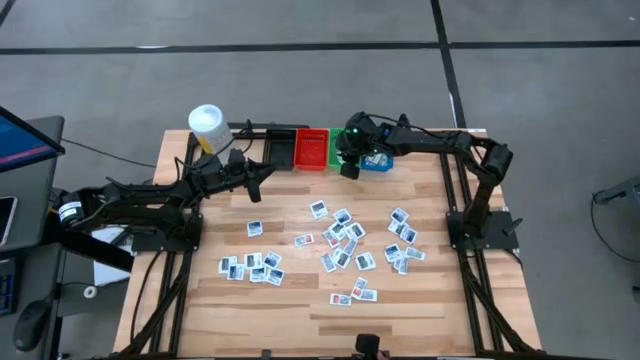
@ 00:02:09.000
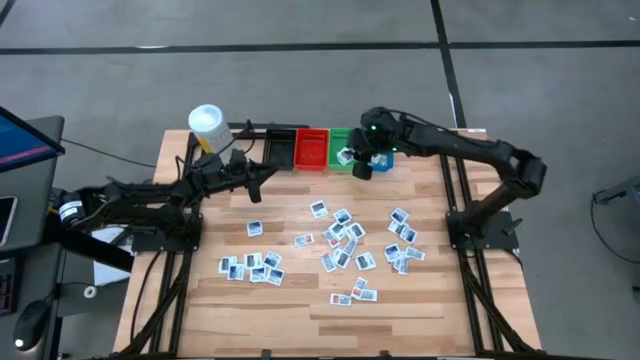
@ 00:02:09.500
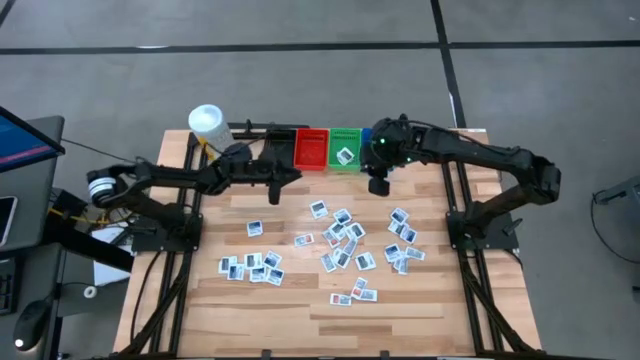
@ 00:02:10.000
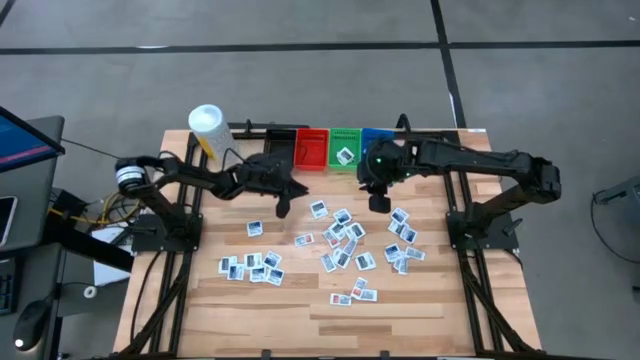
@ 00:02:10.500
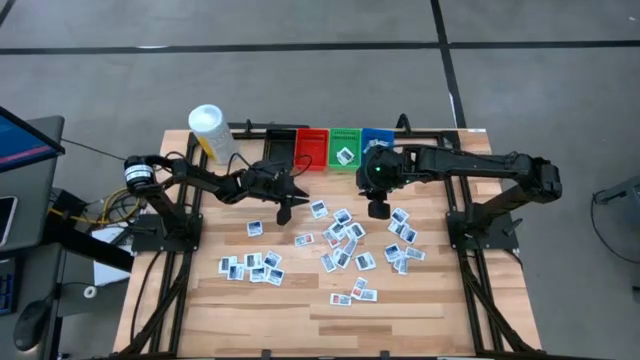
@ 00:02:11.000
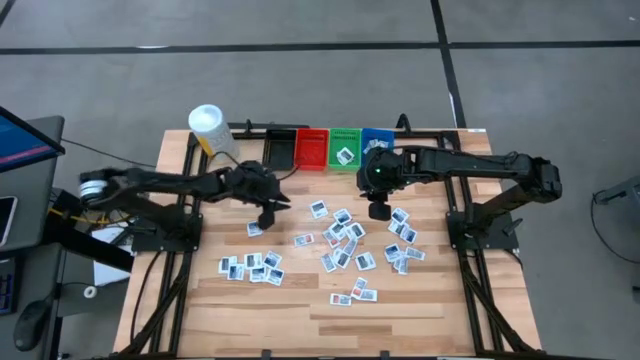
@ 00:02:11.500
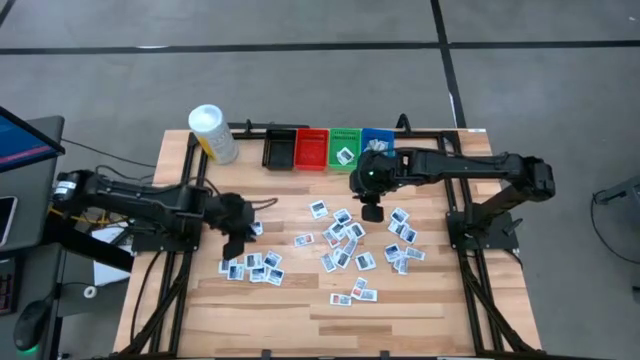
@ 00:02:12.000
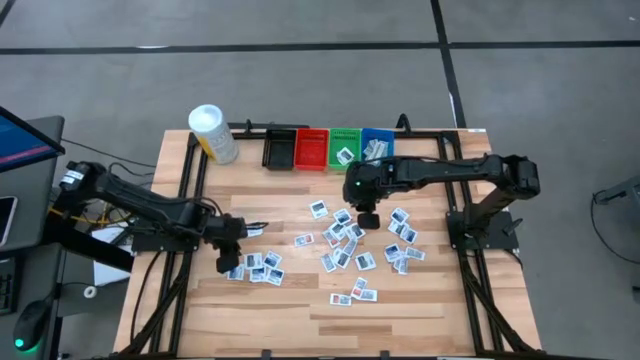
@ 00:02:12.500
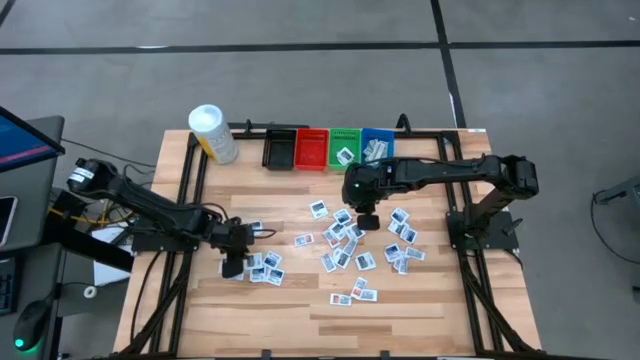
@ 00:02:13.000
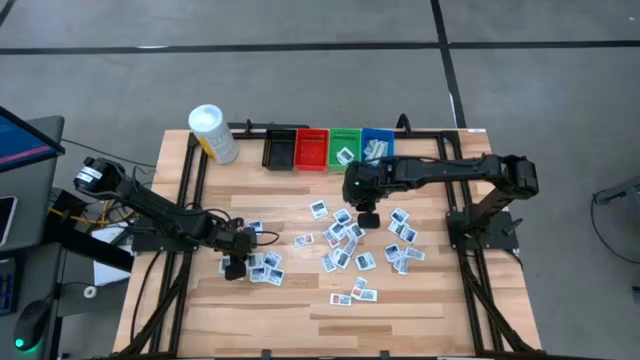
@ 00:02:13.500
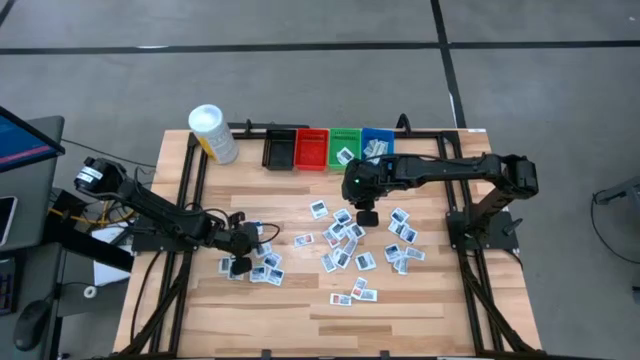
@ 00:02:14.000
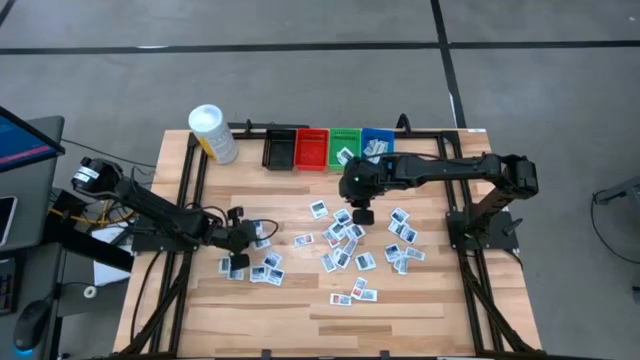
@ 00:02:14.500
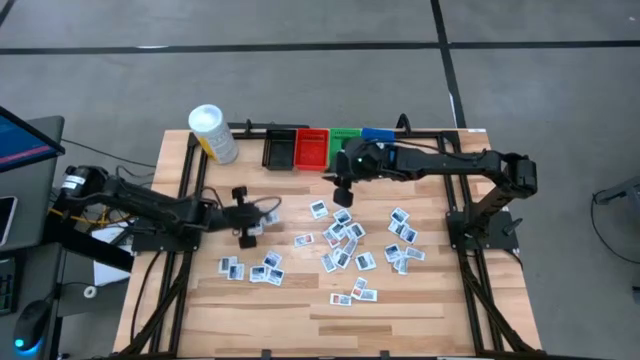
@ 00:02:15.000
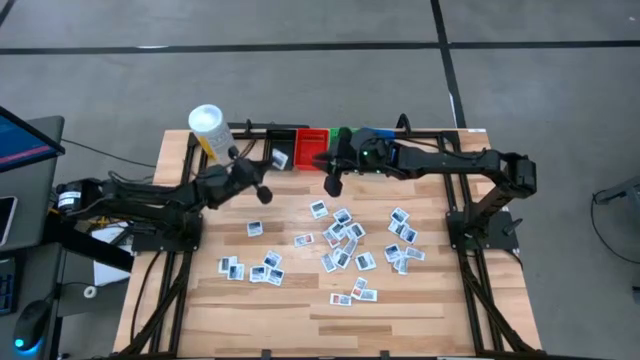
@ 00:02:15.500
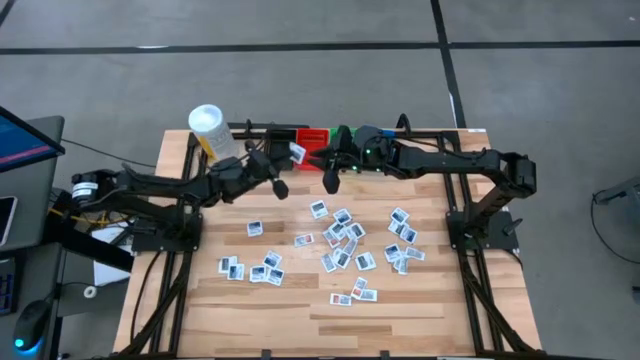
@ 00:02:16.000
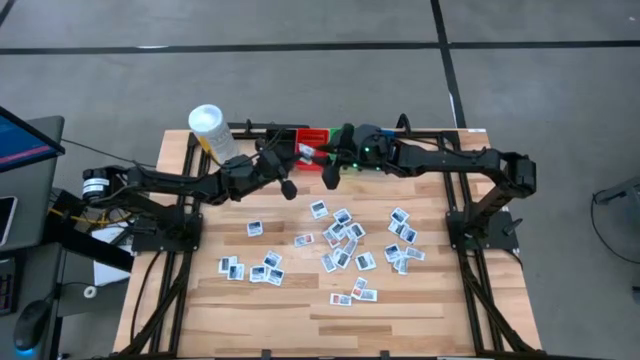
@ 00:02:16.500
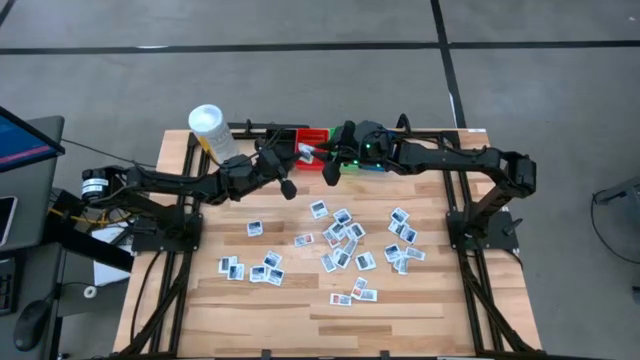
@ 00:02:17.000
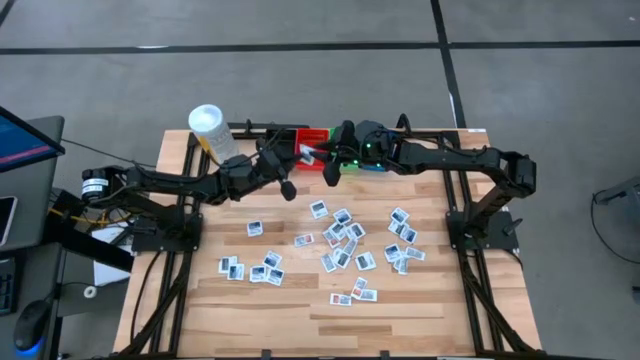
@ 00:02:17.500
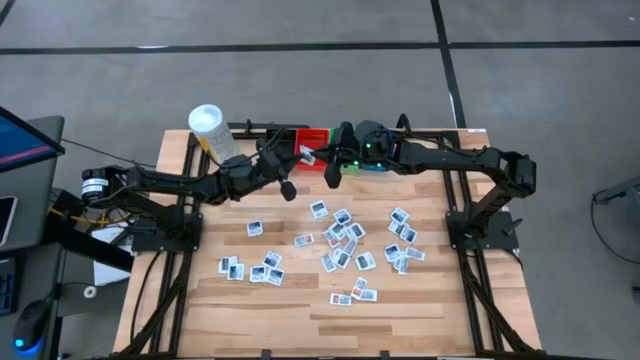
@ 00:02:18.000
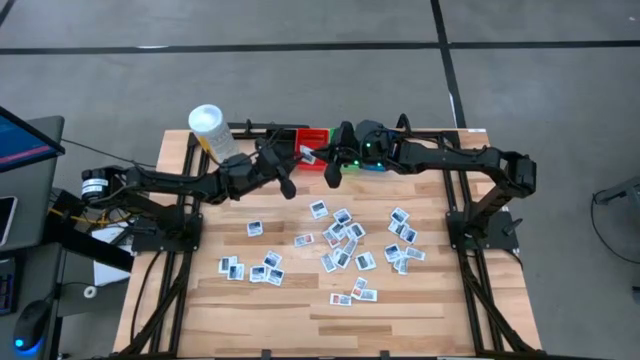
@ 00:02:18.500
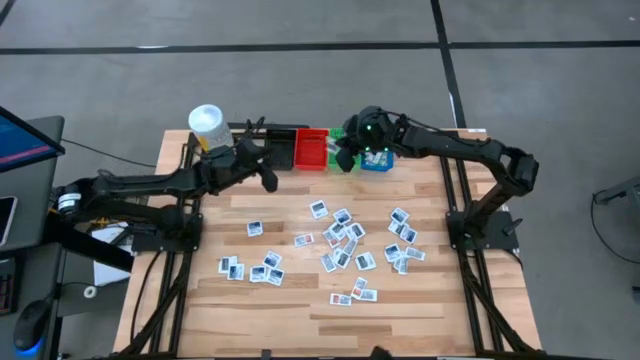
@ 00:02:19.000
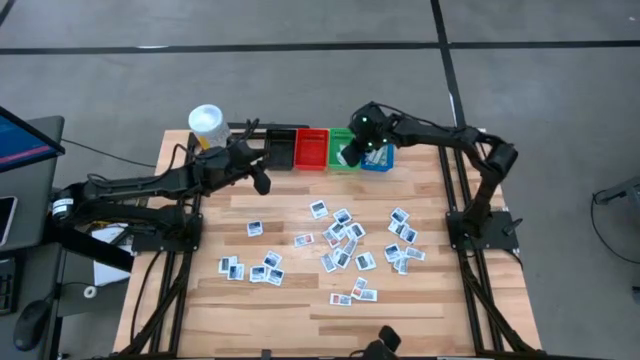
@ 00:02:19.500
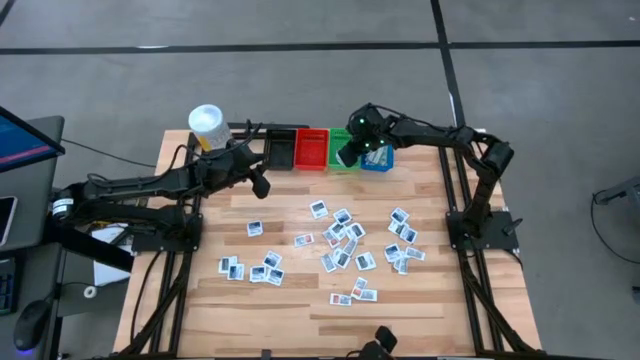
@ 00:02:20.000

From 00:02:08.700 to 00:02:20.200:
Task: Pick & Place First Aid Supplies
Put the towelette pack into the green bin

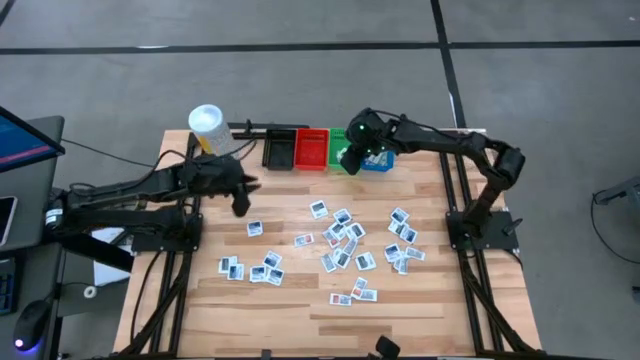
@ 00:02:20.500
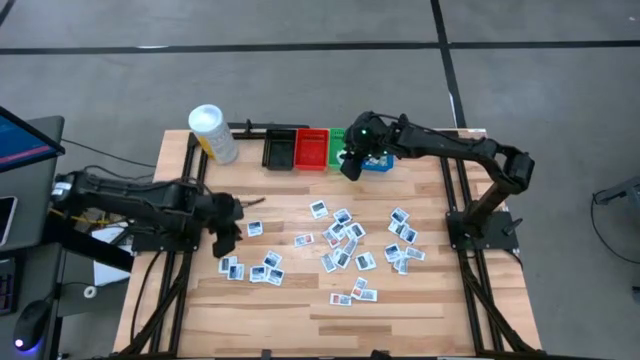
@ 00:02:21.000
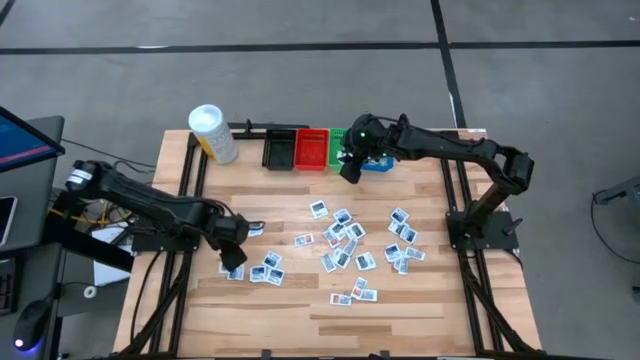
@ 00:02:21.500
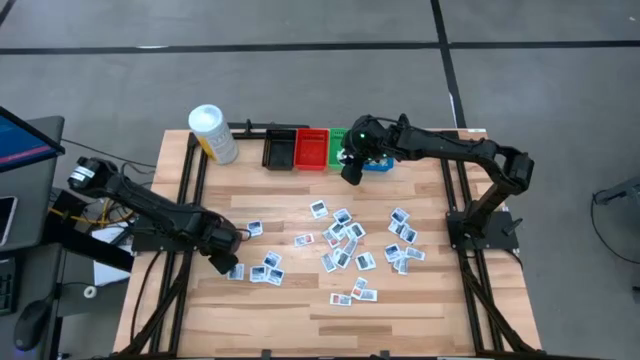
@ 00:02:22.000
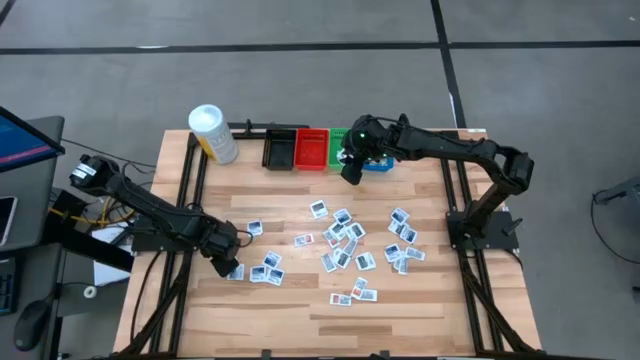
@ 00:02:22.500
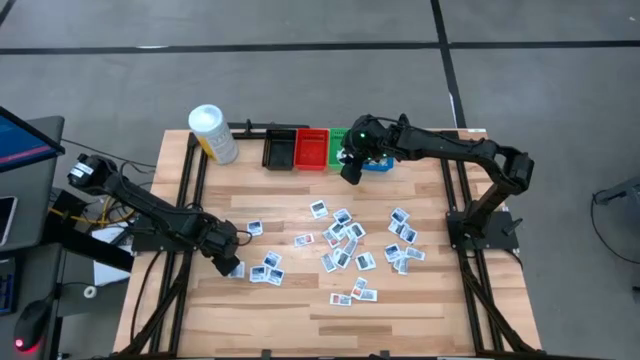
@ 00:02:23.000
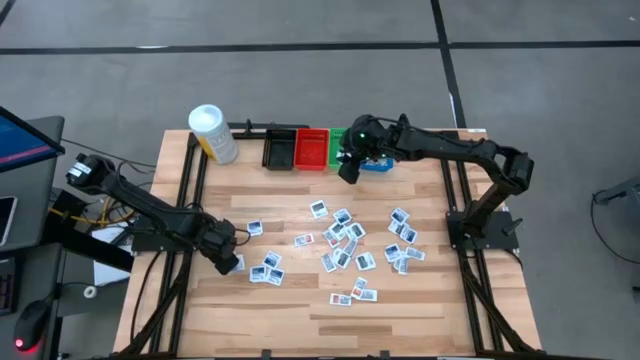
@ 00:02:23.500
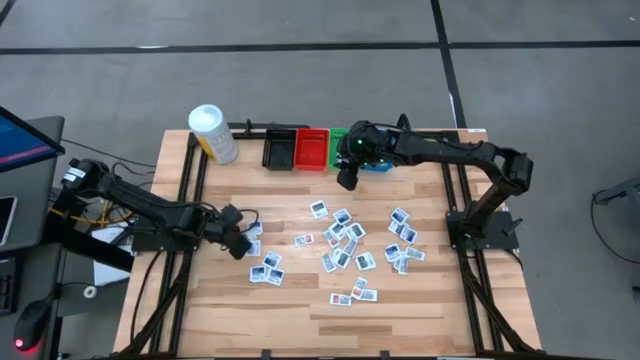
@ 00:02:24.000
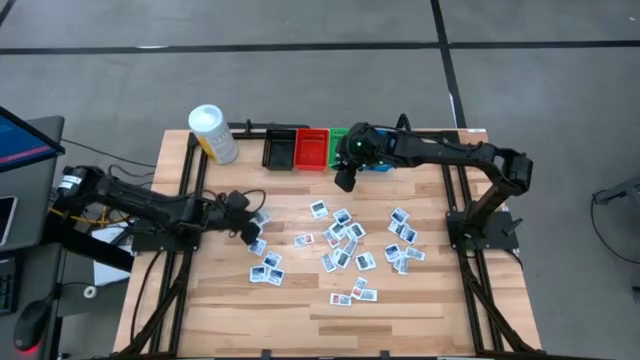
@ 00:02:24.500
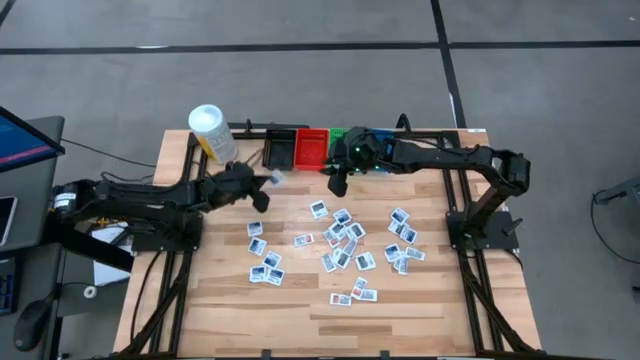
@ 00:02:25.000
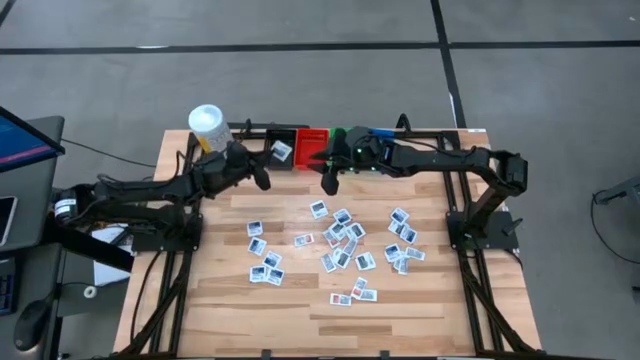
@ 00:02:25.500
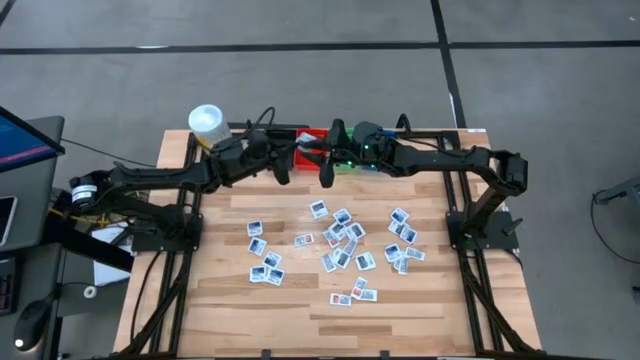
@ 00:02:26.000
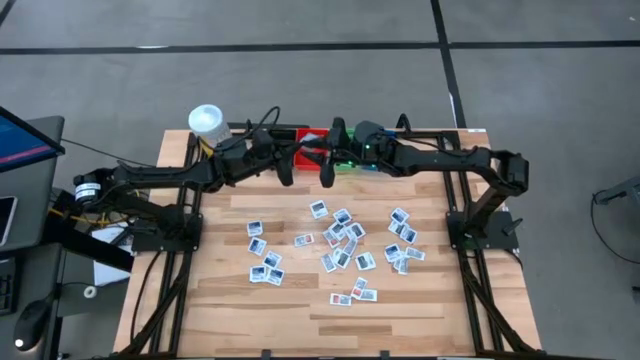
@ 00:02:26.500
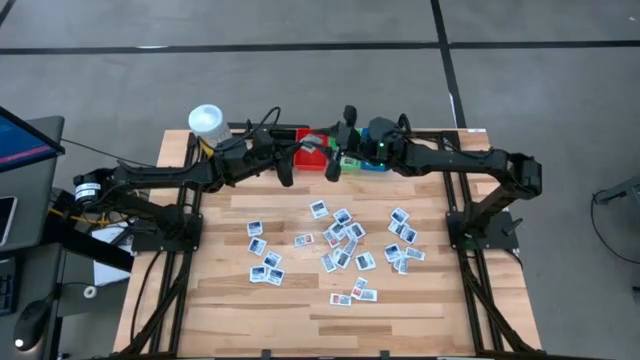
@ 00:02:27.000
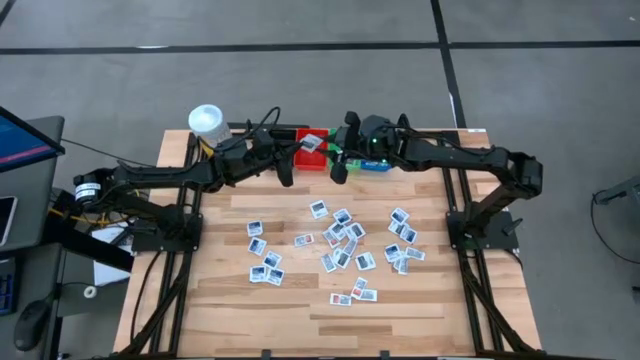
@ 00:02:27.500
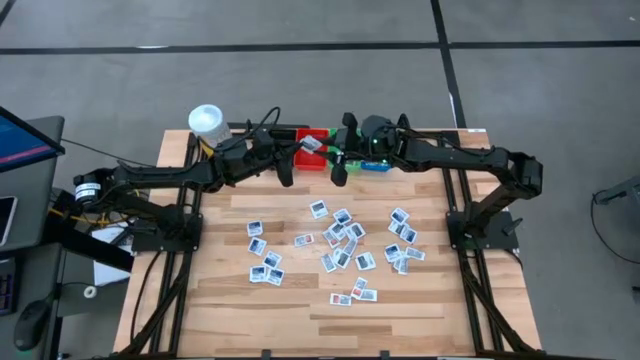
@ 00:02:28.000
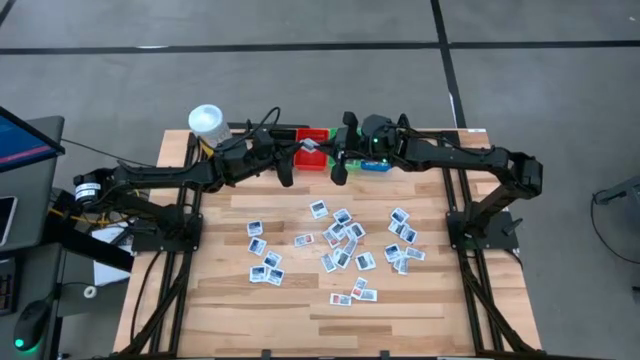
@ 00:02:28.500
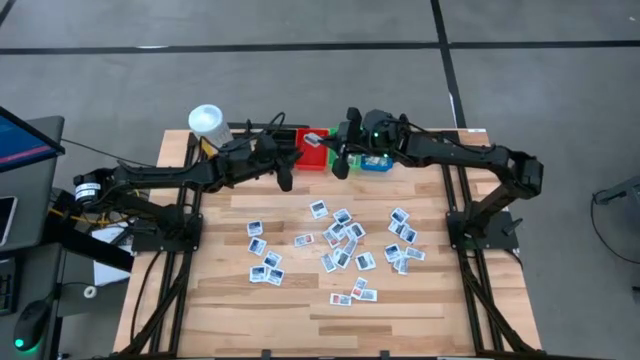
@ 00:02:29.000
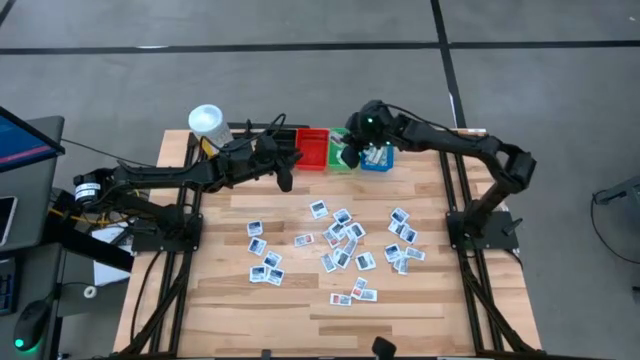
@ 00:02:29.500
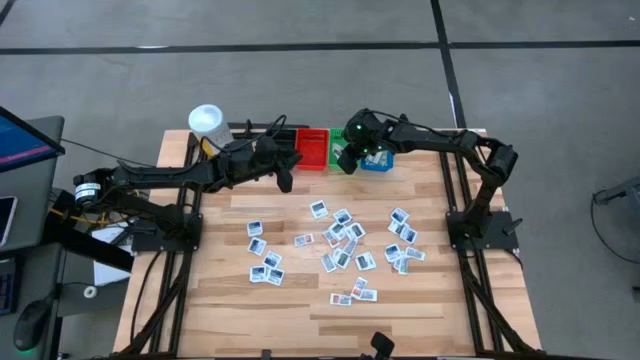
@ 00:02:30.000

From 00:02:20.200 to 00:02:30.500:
Put the towelette pack into the green bin
